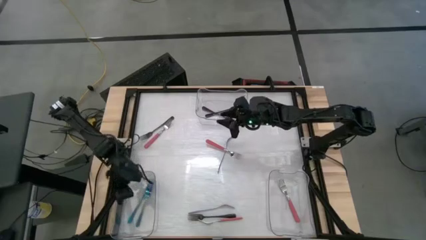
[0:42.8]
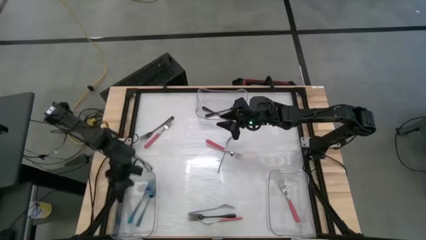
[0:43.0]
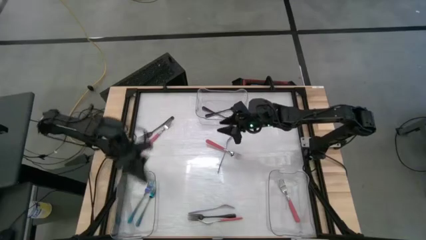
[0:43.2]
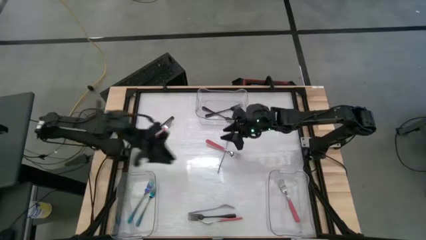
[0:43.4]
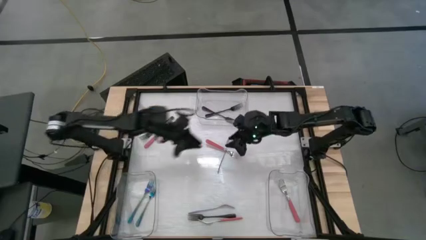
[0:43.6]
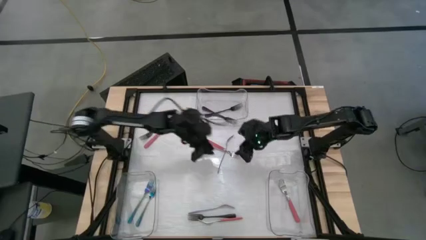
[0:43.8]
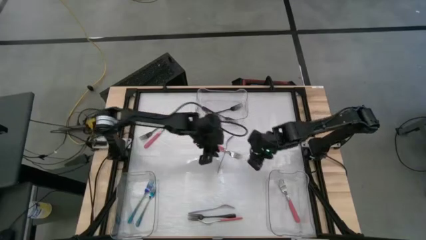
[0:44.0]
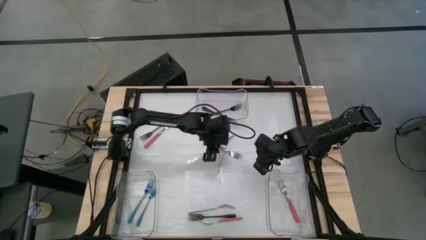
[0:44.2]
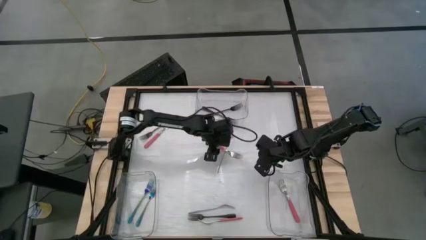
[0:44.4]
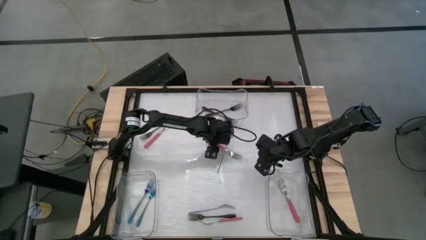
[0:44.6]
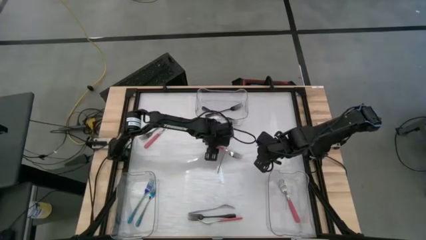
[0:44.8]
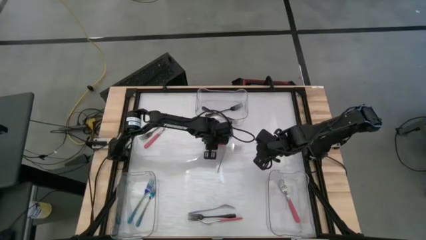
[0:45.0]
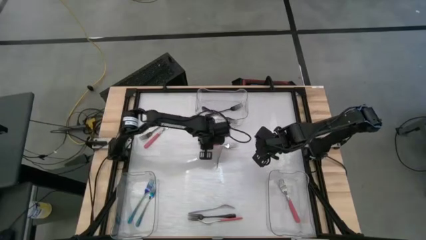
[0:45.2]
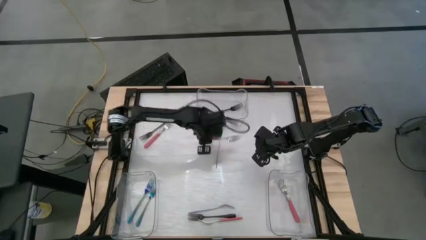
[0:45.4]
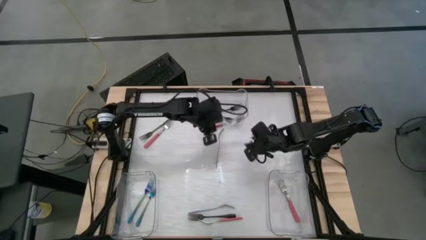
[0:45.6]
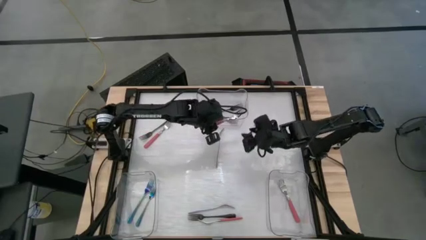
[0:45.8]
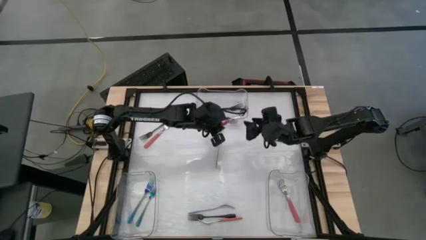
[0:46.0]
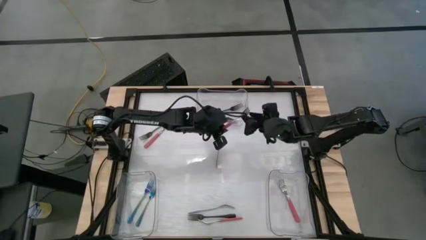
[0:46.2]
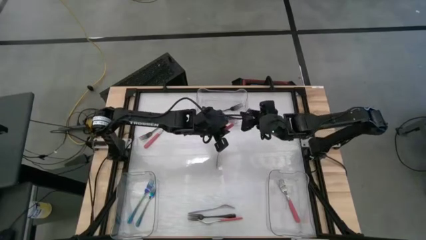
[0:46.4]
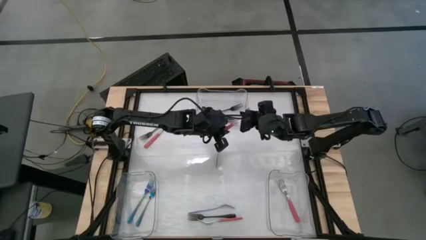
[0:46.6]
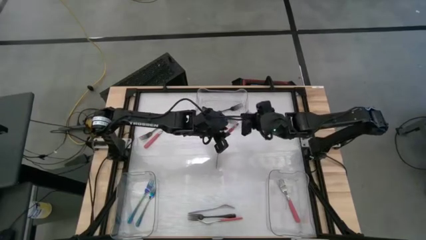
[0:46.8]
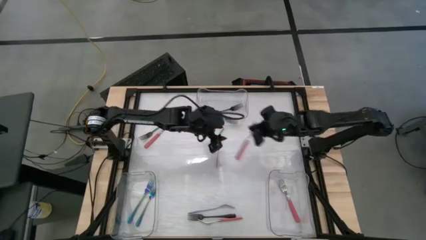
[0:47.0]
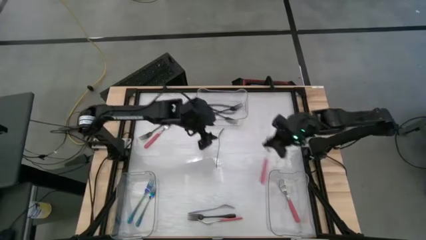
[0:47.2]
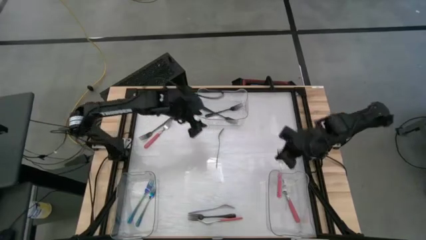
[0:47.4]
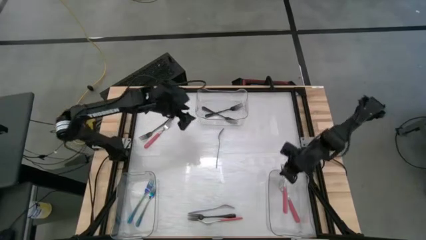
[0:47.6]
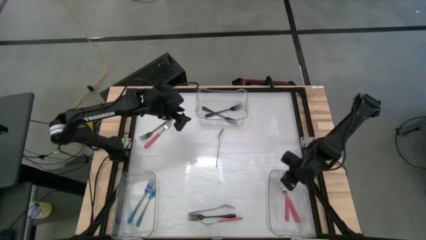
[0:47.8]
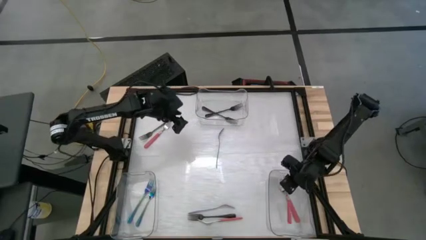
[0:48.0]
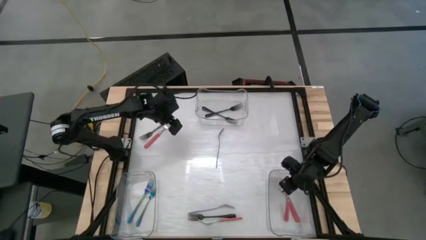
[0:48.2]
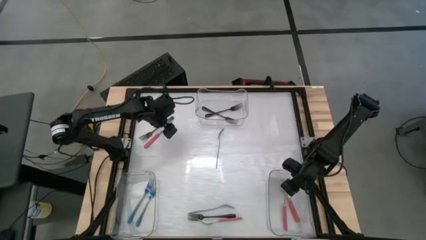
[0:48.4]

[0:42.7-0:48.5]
Task: Sort silverware by color (type)
Put the pink fork into the bottom right transparent bin

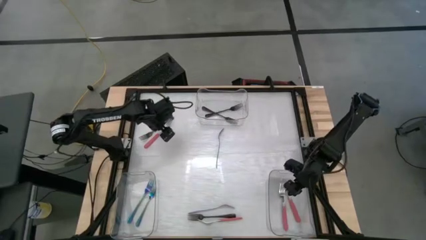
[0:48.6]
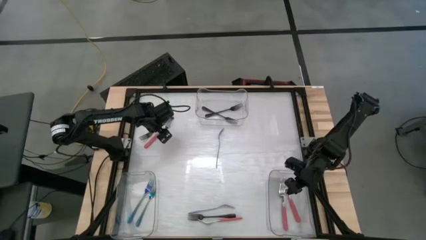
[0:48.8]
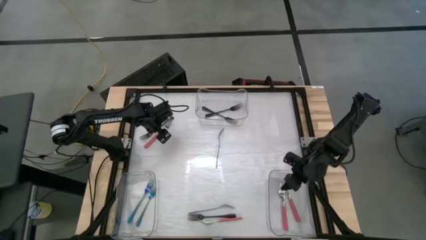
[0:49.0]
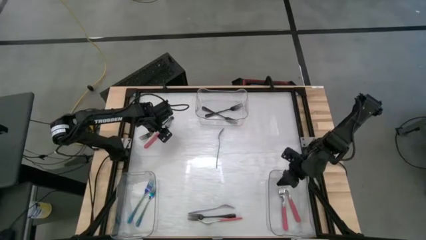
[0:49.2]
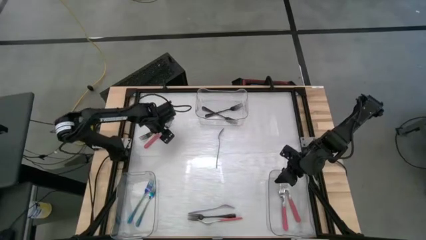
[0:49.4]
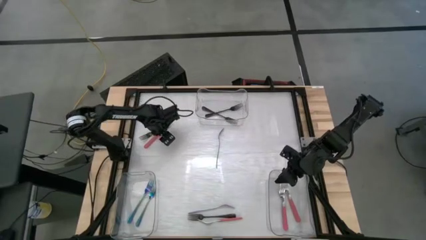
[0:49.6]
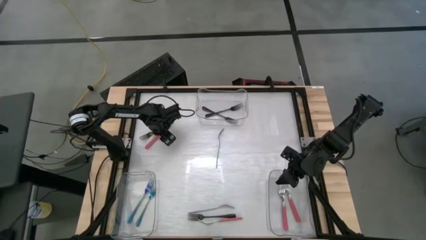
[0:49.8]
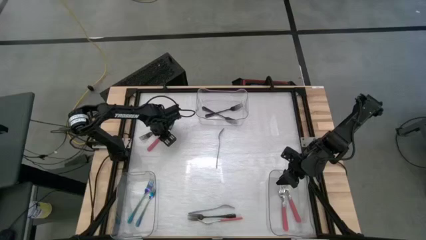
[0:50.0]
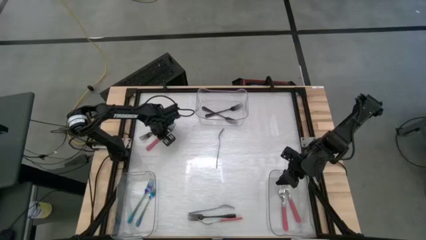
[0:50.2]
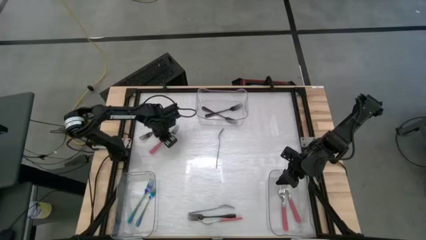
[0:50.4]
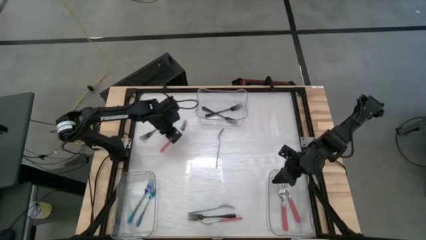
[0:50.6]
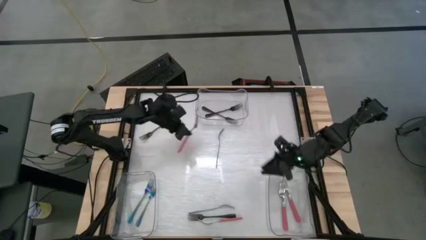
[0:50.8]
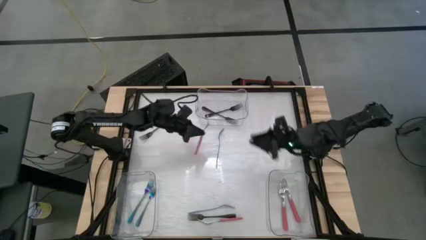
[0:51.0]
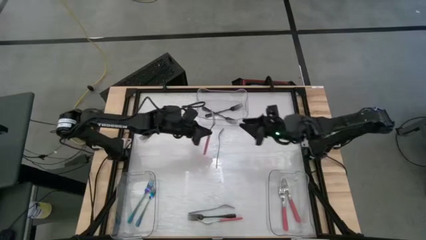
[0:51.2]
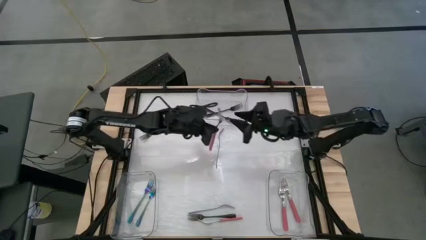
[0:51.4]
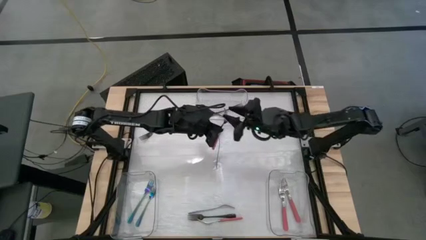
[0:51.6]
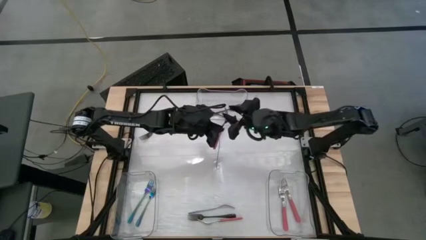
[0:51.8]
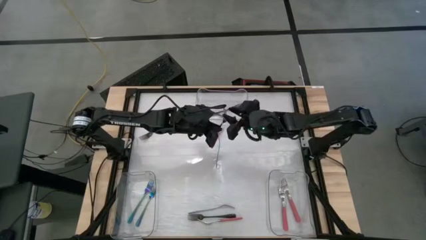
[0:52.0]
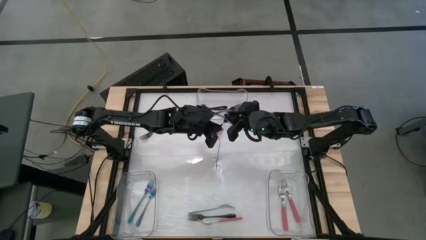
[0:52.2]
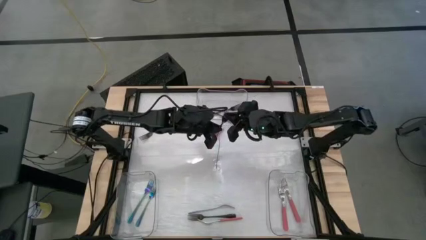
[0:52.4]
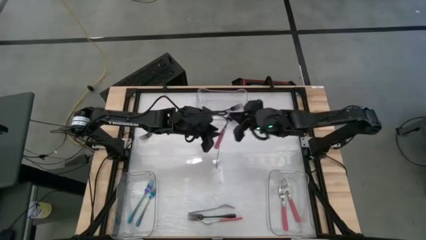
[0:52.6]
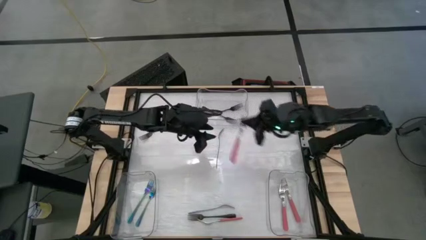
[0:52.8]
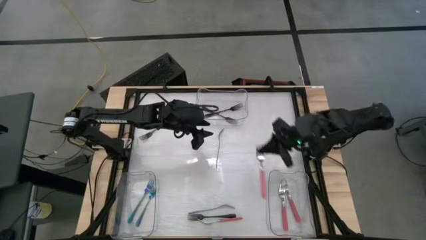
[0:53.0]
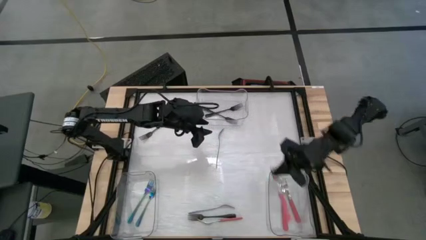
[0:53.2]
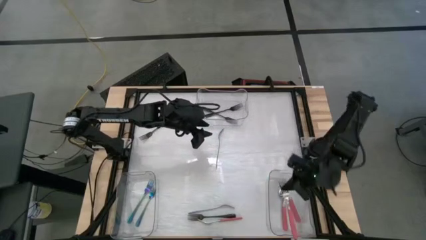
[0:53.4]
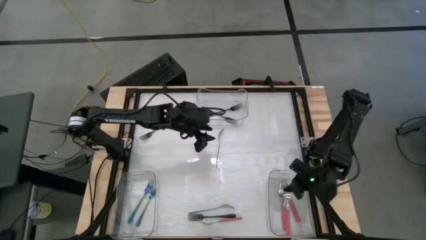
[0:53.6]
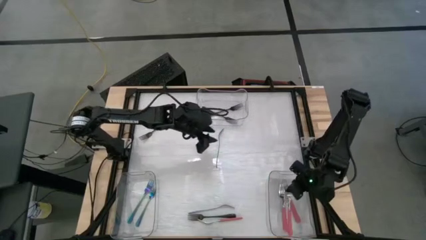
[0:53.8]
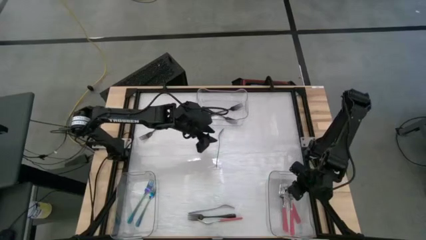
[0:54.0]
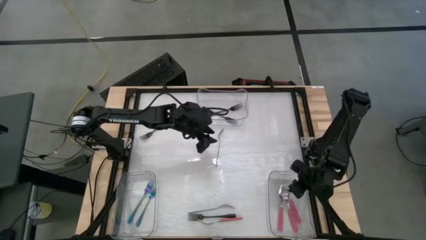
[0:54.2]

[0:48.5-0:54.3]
Put the pink fork into the bottom right transparent bin

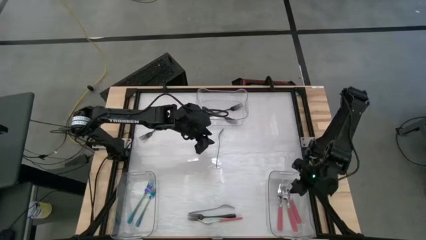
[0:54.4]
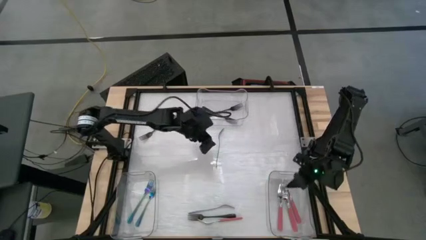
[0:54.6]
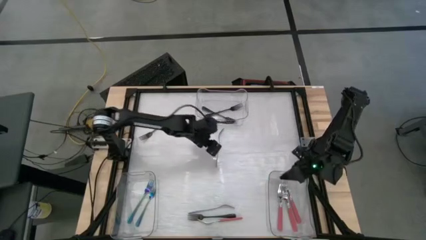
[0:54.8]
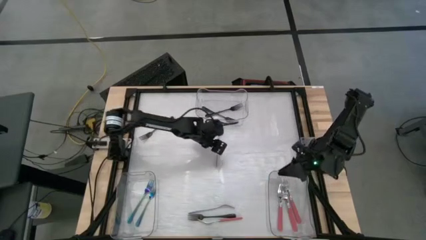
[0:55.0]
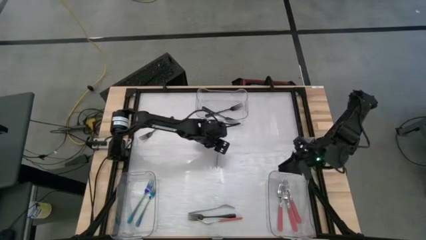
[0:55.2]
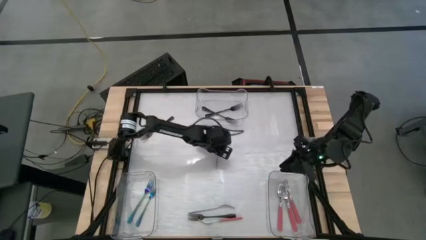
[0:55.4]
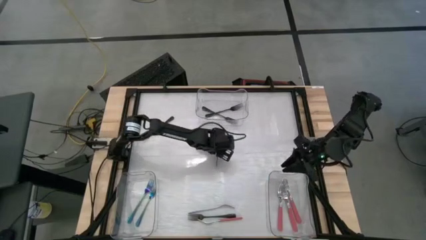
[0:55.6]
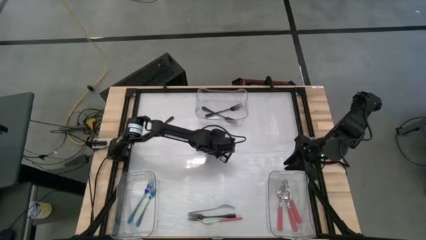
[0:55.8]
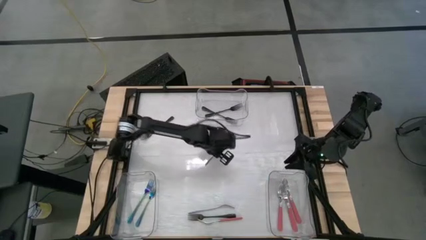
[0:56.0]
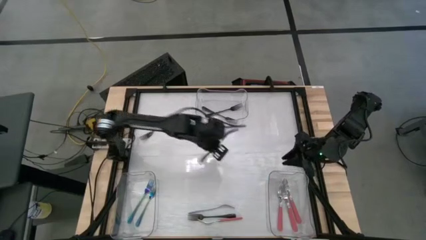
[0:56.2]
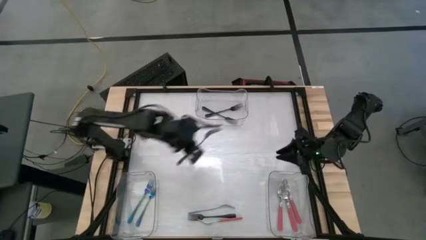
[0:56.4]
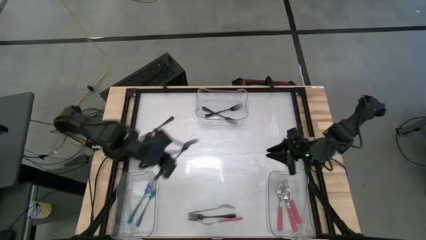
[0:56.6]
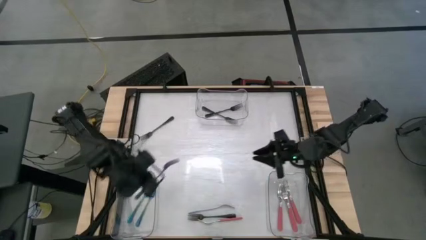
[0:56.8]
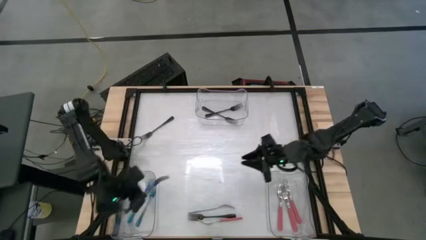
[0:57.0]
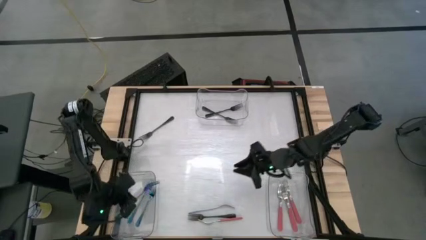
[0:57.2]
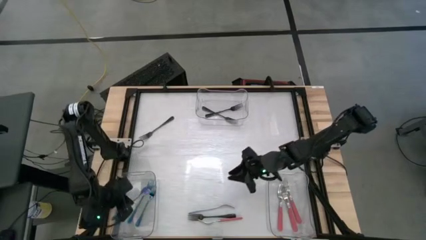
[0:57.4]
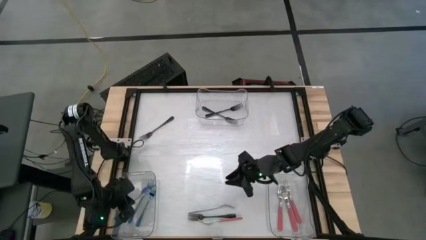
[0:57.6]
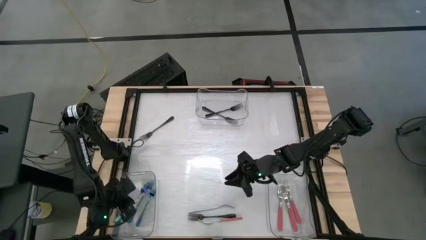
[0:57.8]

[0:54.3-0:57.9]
Put the blue fork into the bottom left transparent bin

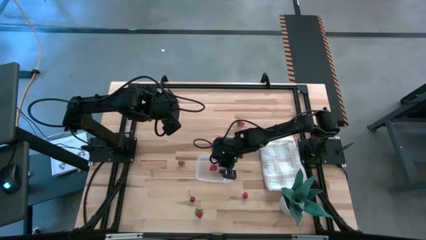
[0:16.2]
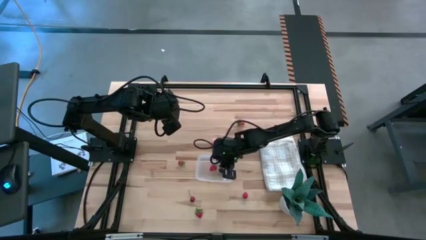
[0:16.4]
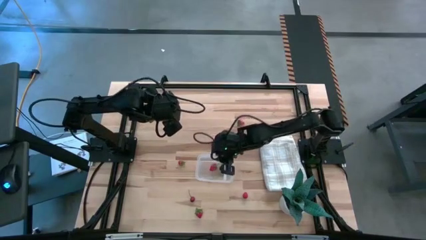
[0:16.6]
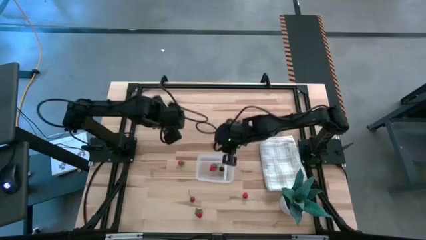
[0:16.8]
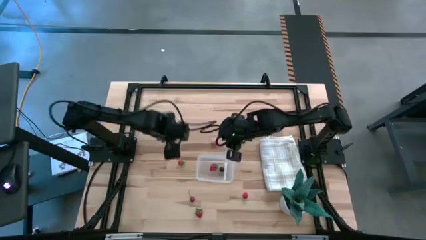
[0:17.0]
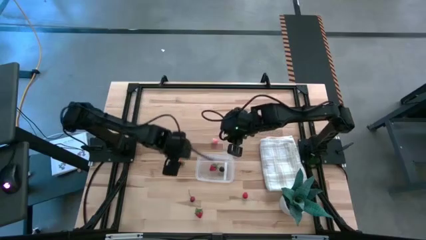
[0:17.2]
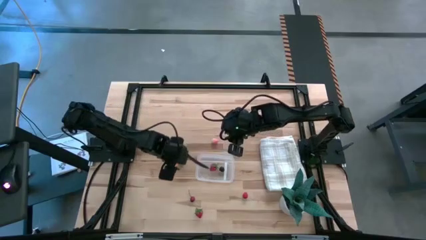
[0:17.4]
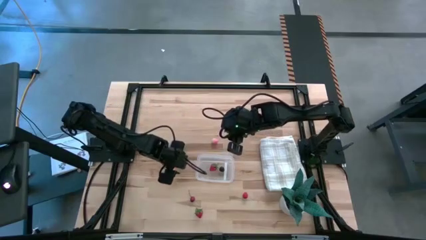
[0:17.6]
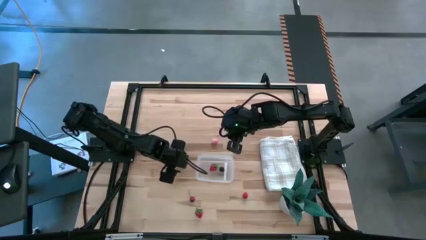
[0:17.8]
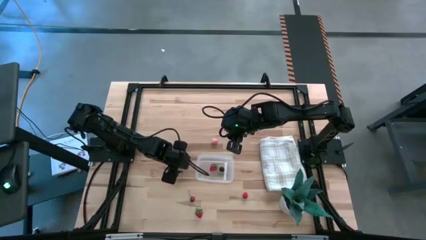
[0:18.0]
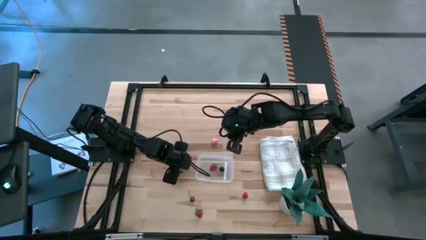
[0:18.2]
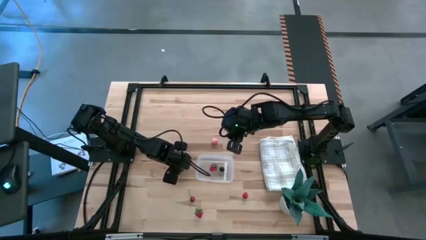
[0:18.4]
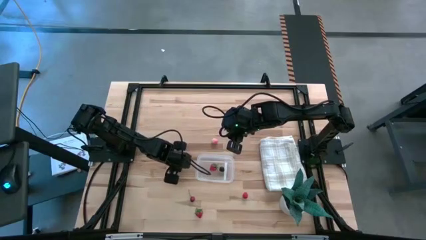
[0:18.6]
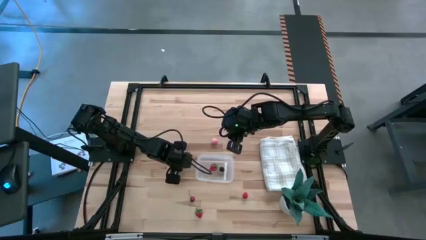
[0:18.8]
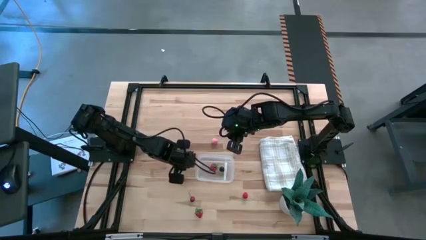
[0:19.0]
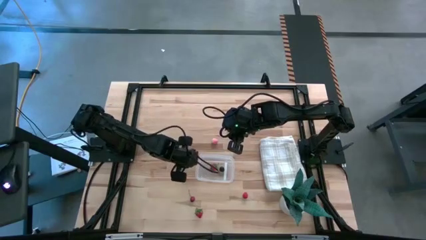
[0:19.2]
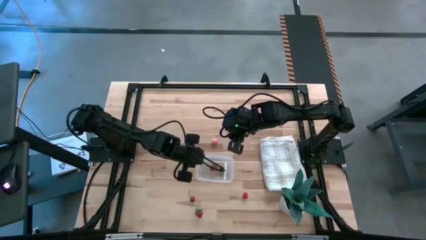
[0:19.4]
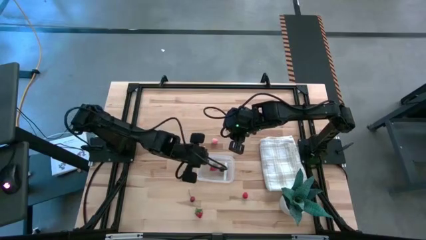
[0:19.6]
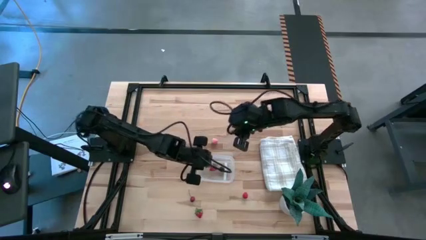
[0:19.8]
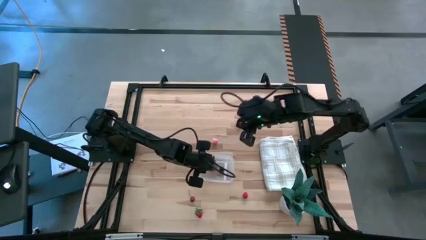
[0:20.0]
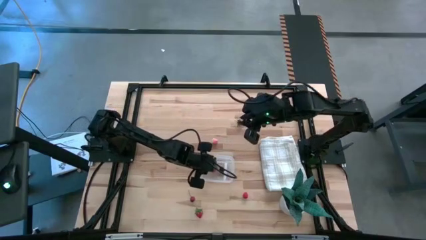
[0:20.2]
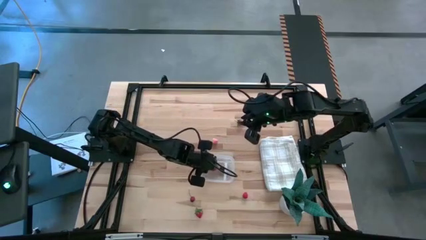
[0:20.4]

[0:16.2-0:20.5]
Task: Pick and placing Produce into tupperware
Put the middle left strawberry into the bin
